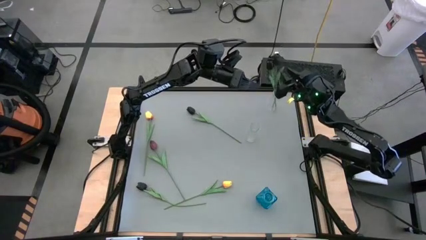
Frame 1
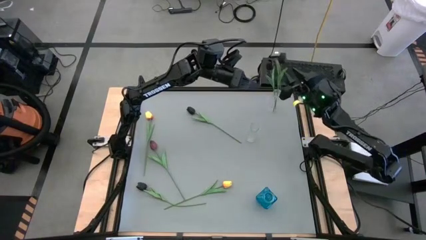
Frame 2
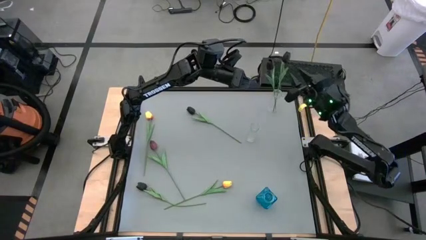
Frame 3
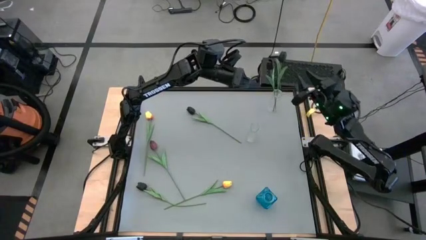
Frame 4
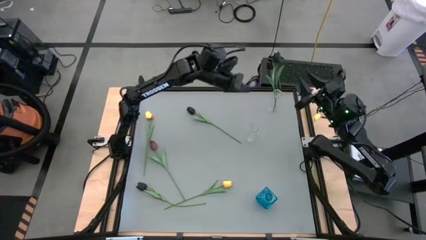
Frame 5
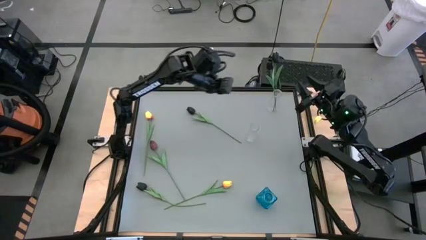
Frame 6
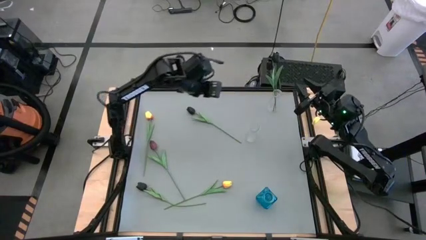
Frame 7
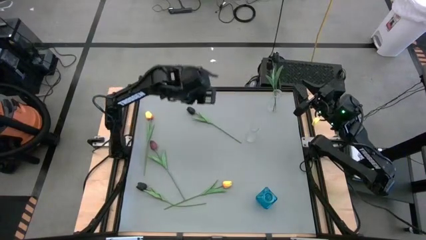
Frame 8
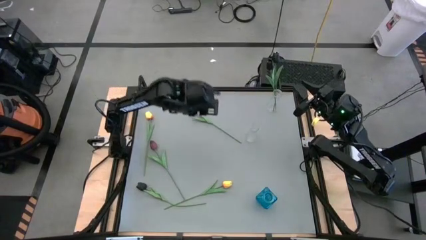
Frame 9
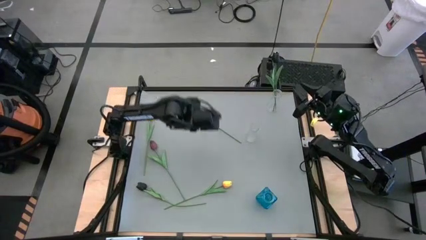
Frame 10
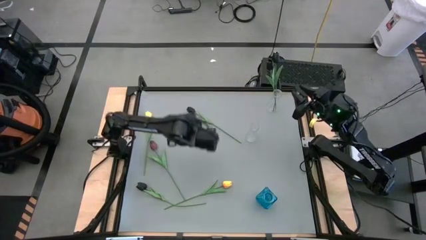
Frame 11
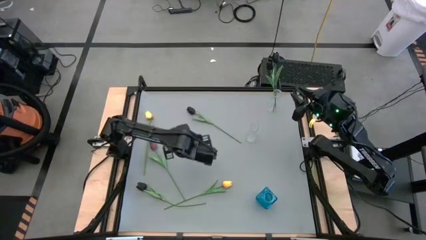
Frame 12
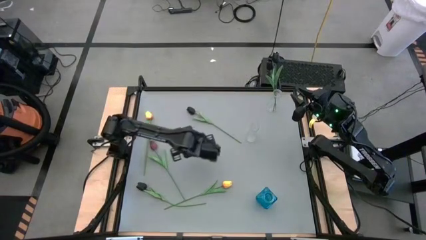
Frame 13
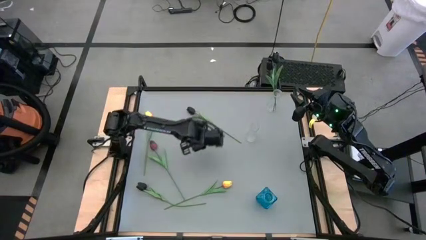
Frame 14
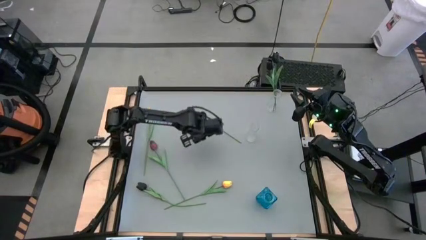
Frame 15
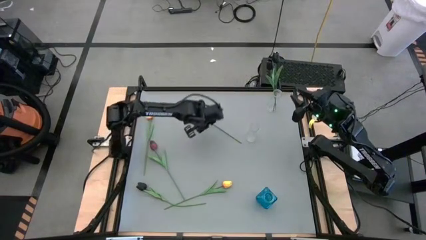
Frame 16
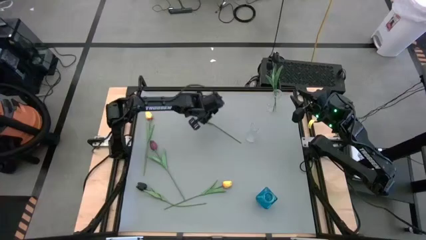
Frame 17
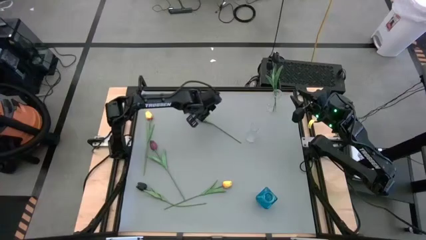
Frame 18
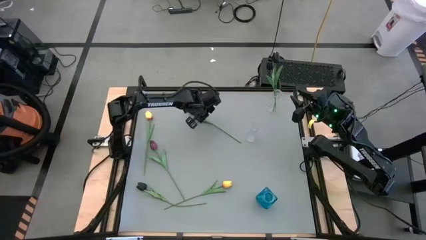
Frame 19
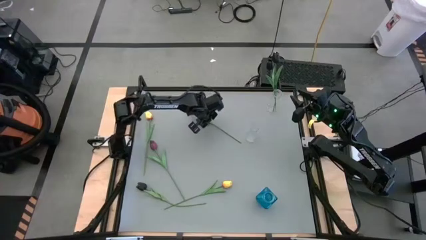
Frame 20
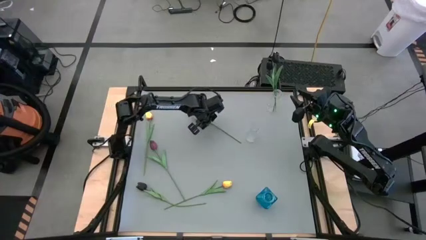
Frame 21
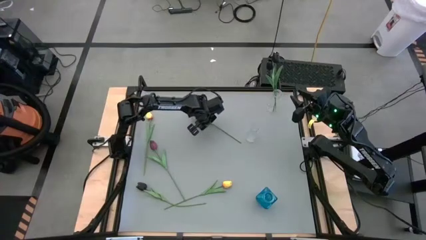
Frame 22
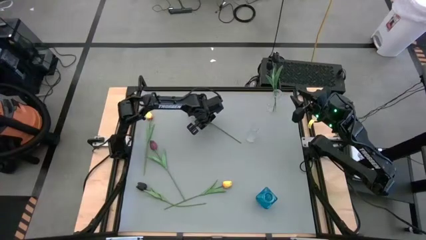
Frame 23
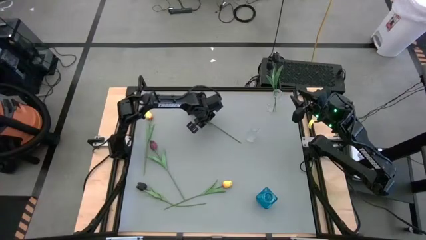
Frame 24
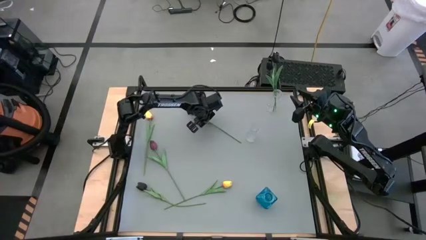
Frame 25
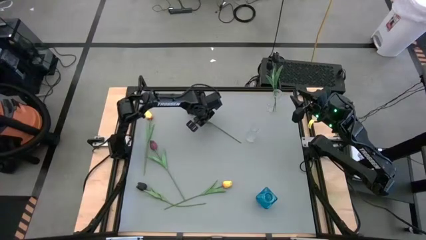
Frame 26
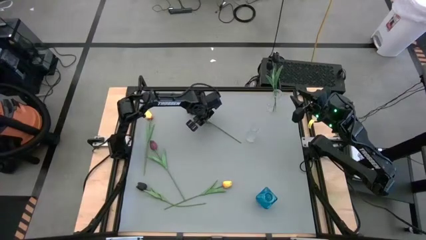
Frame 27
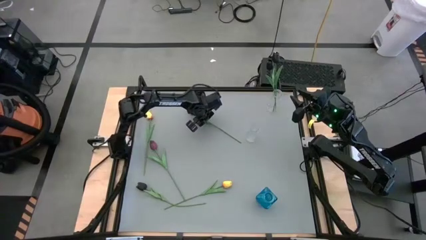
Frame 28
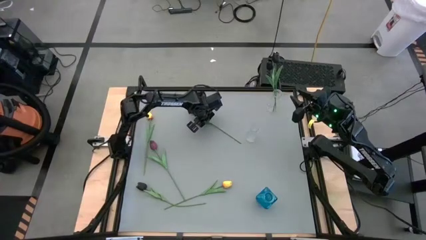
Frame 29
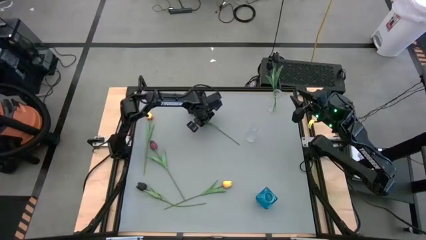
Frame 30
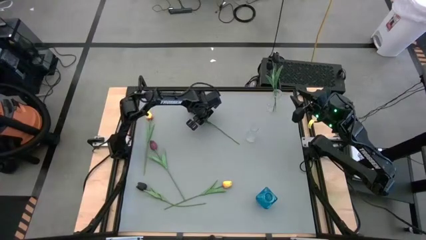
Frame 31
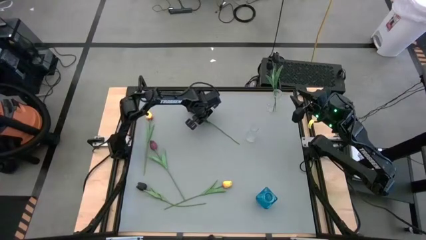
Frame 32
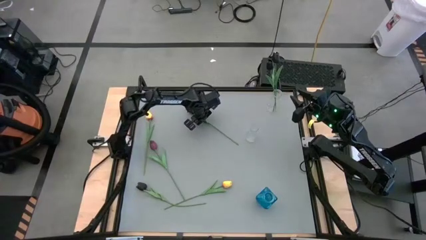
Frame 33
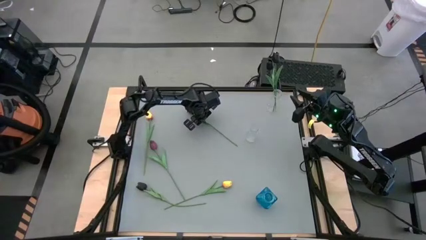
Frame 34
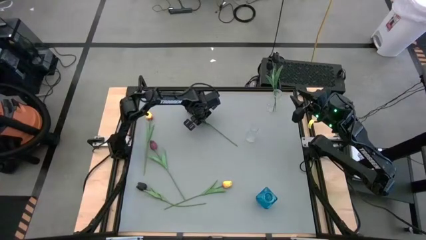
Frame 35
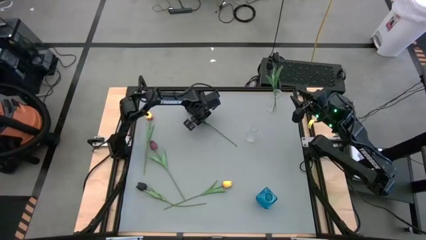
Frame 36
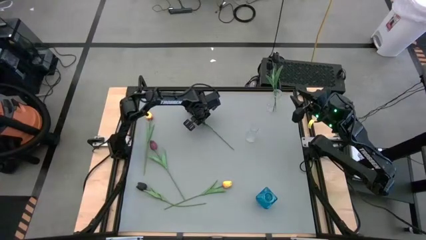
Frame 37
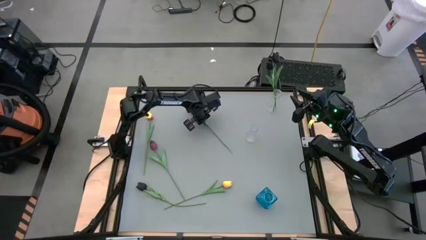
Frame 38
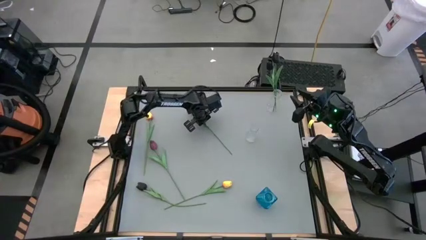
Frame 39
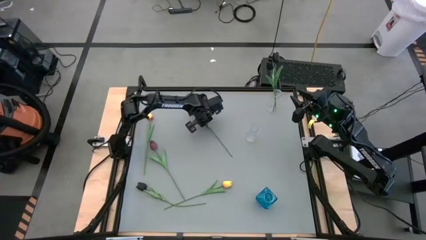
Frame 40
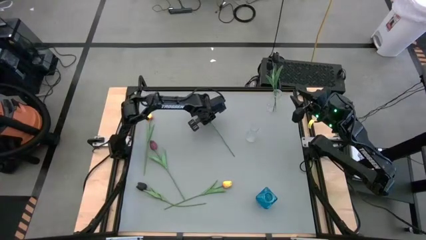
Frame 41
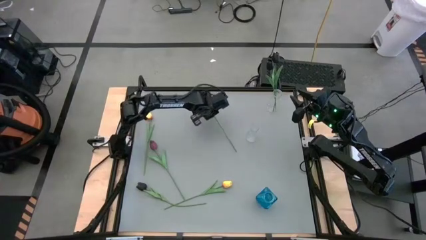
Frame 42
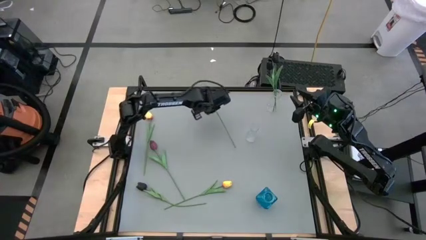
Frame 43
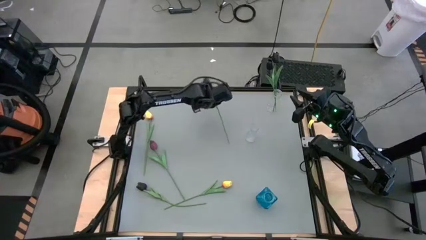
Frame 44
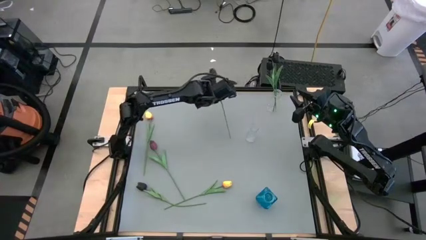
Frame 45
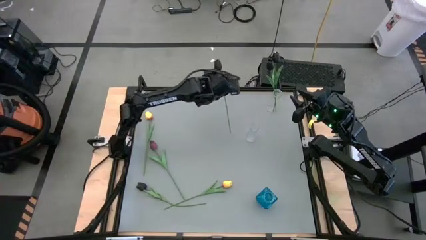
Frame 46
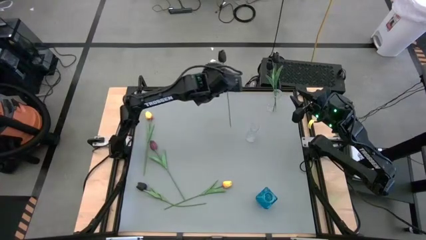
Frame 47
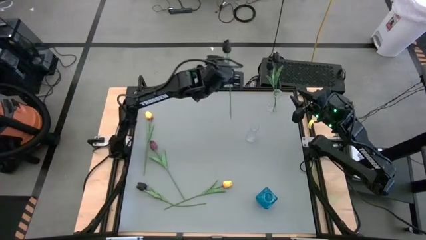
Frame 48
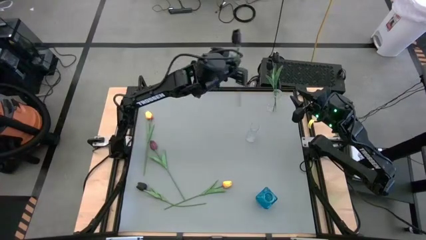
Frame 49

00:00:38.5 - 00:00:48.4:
Task: Sort flowers into vase by color
Put the top black tulip into the top transparent vase

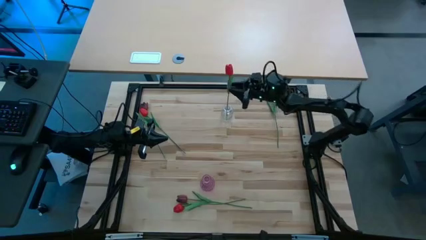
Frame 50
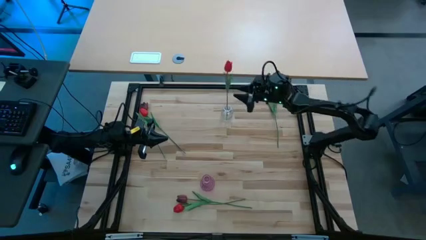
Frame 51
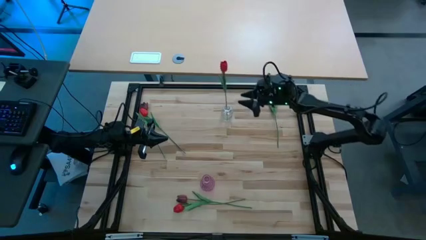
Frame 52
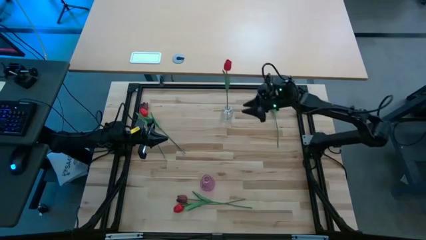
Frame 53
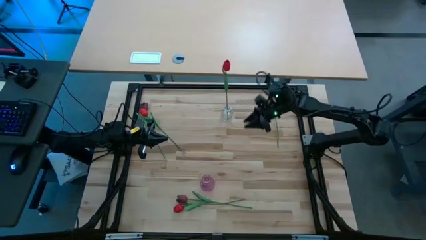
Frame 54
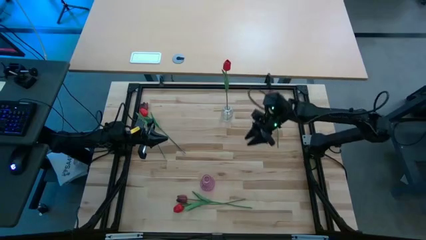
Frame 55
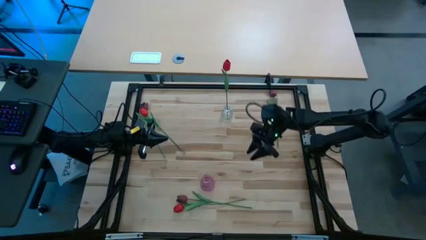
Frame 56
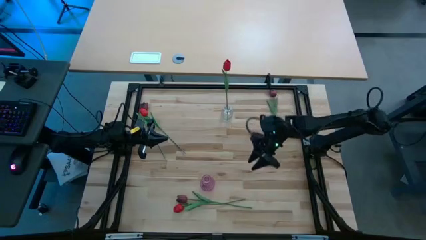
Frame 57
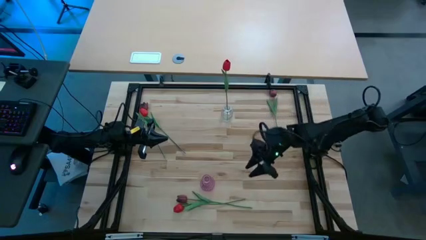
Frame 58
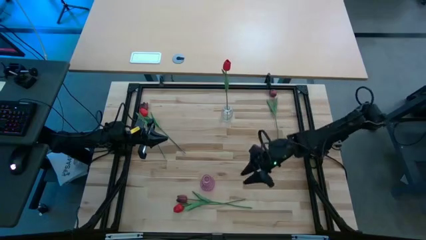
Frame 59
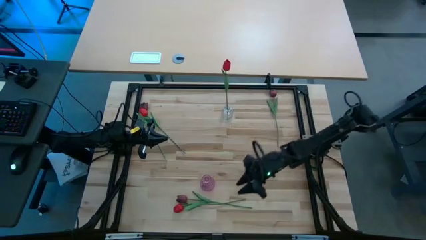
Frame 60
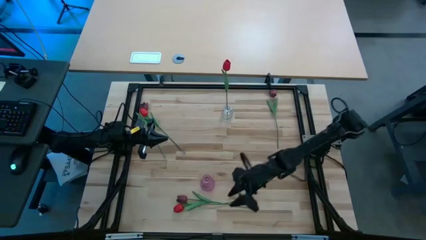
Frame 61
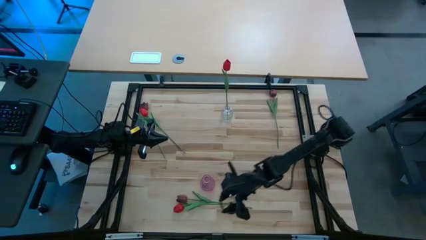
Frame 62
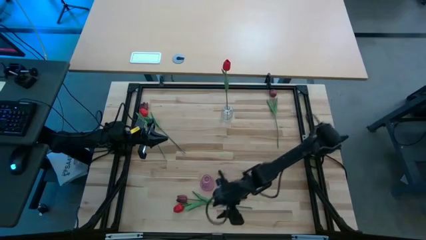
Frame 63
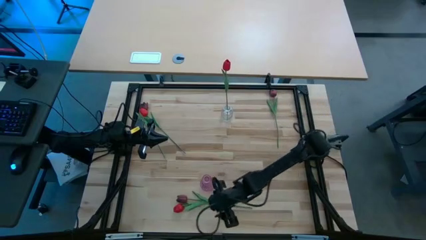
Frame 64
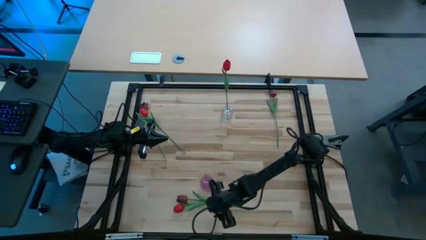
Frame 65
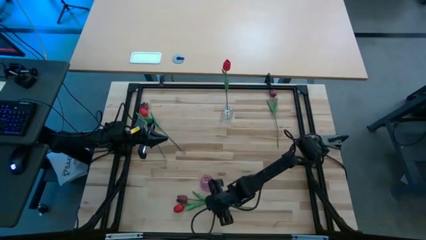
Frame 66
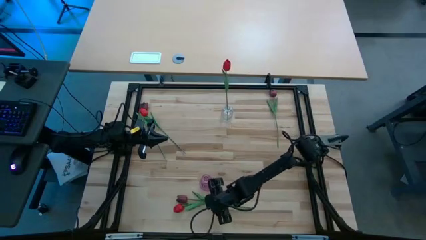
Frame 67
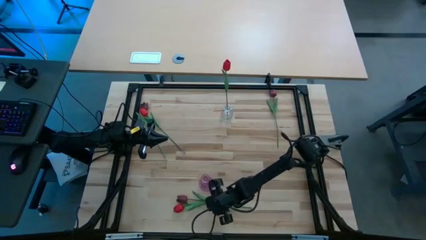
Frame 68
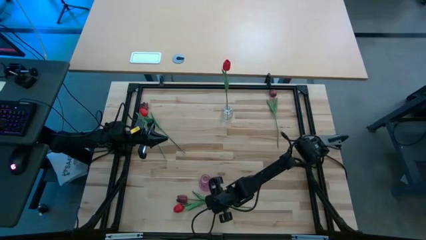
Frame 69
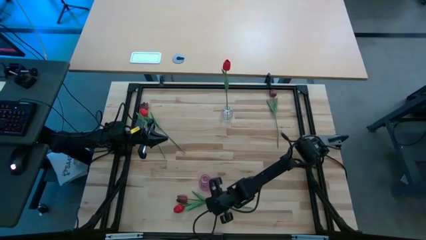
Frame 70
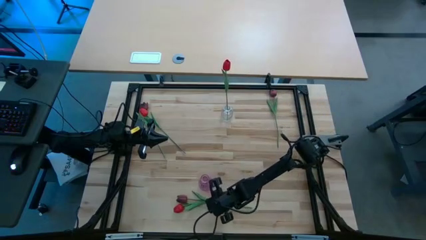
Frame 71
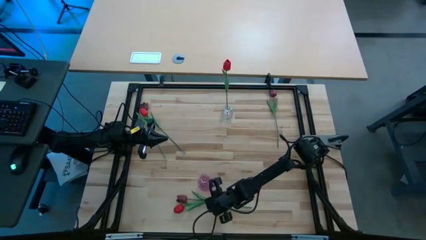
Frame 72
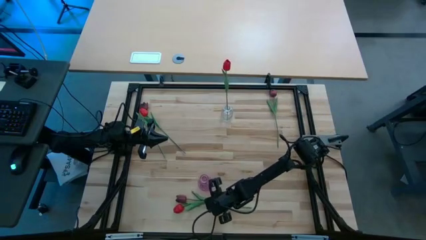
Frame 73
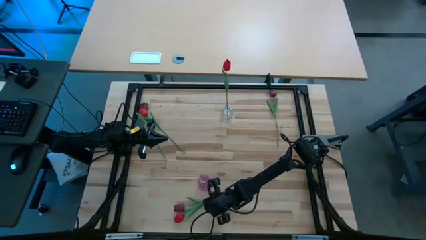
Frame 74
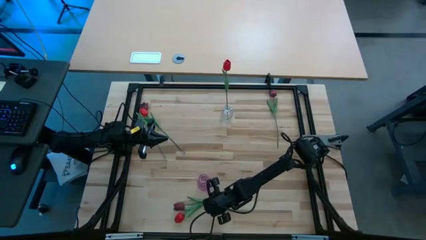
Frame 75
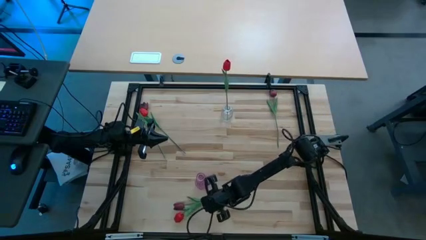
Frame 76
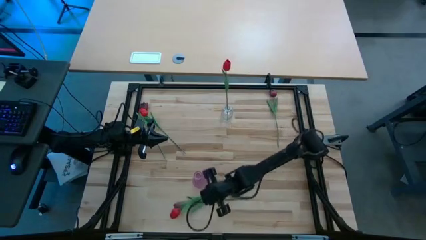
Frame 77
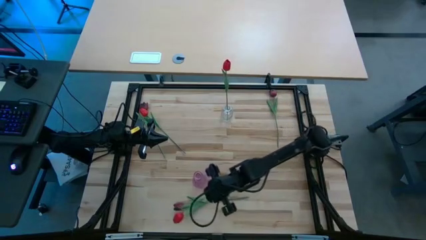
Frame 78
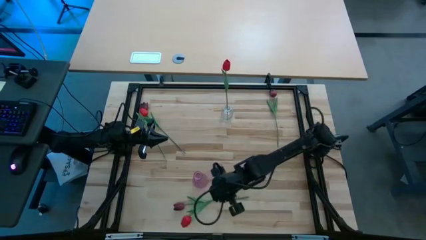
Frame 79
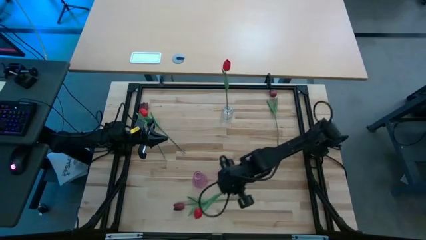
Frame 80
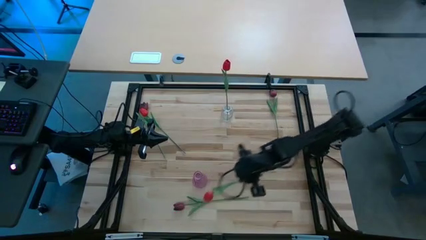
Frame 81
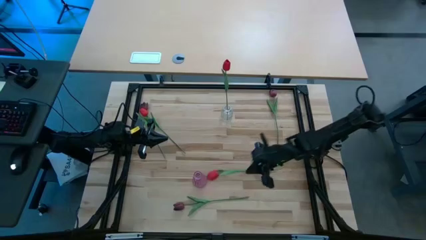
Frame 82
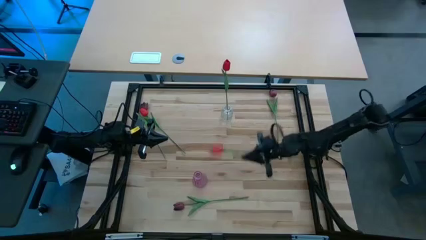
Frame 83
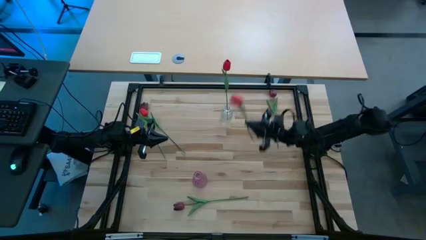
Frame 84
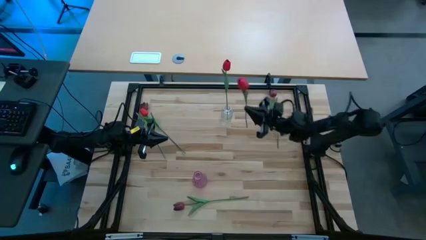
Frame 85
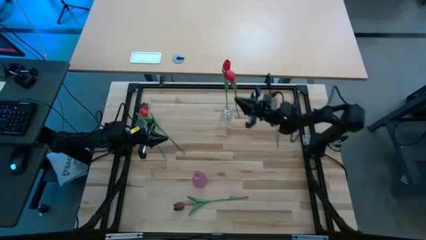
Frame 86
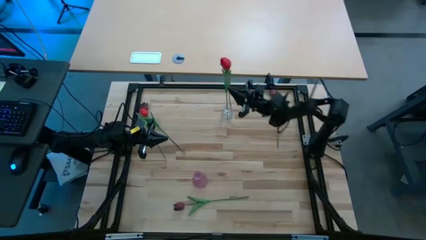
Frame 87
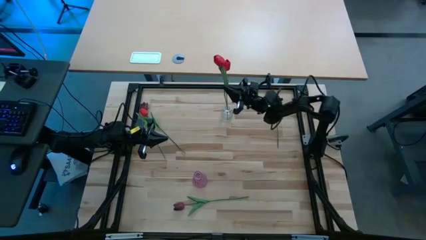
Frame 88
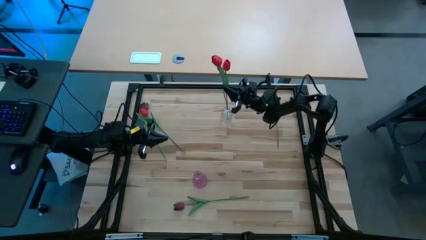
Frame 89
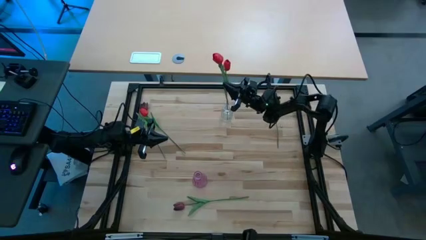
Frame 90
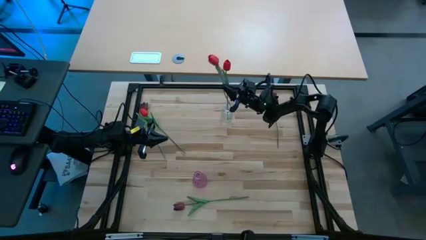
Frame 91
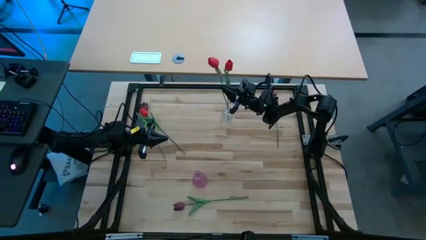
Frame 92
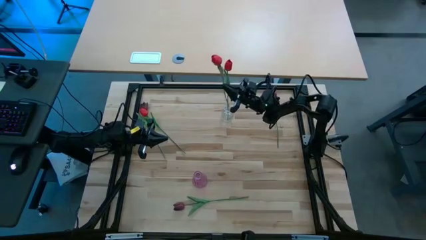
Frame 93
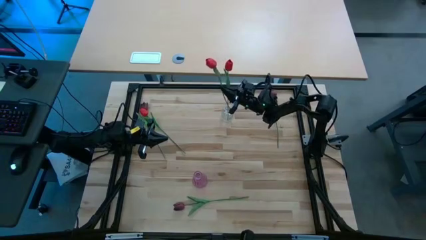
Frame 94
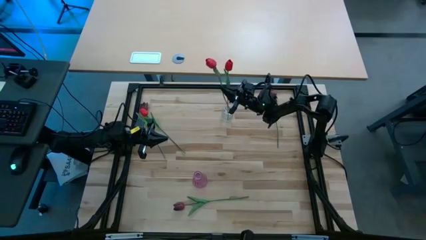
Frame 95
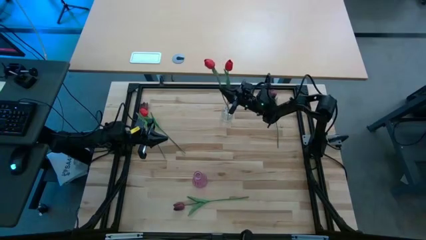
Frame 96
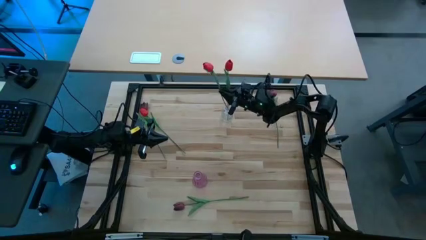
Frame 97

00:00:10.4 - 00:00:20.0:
Task: Sort flowers into vase by color
Put the bottom red tulip into the transparent flower vase
